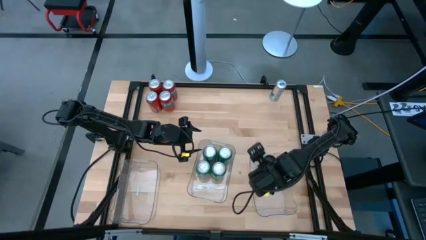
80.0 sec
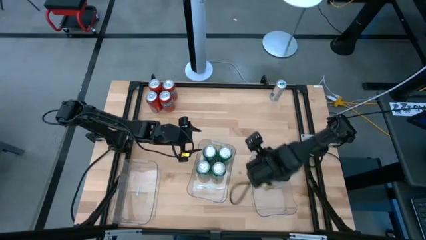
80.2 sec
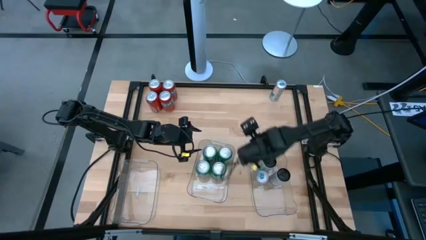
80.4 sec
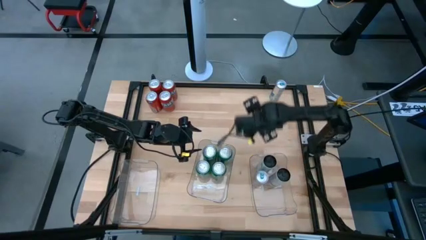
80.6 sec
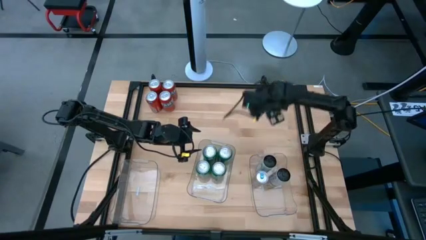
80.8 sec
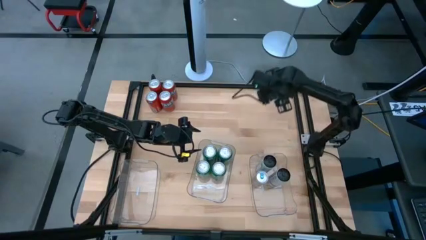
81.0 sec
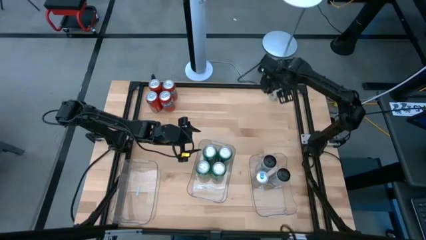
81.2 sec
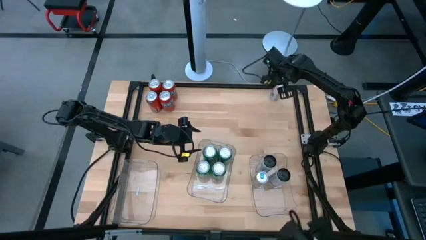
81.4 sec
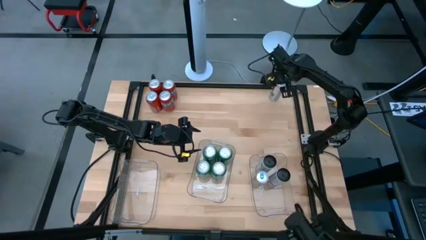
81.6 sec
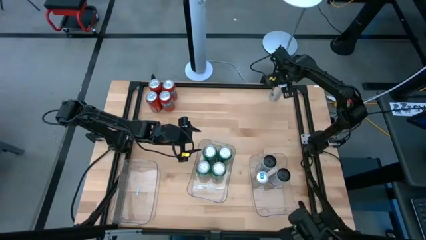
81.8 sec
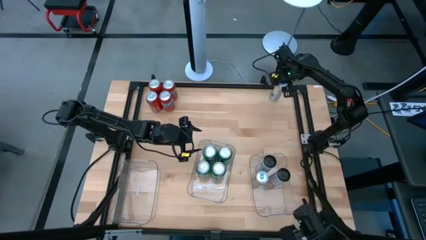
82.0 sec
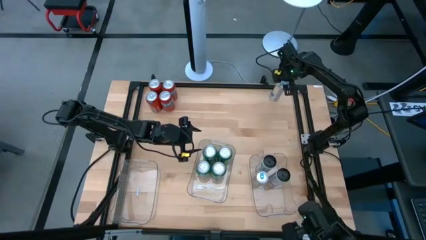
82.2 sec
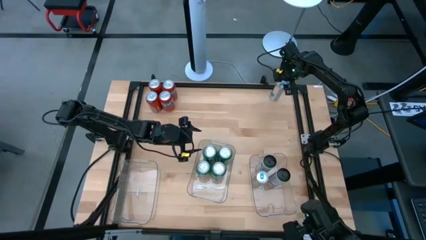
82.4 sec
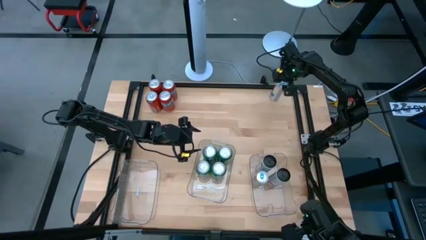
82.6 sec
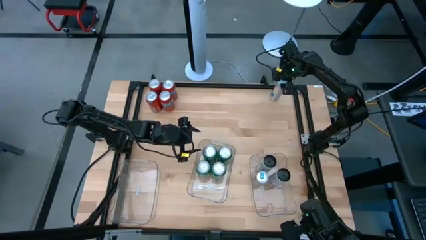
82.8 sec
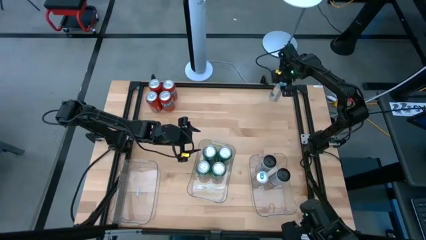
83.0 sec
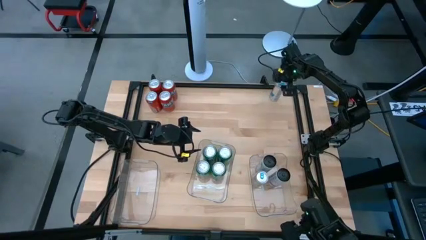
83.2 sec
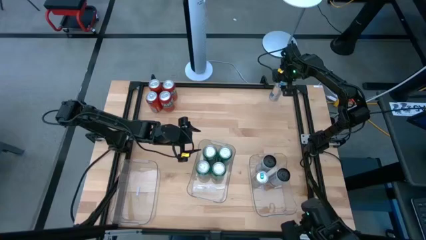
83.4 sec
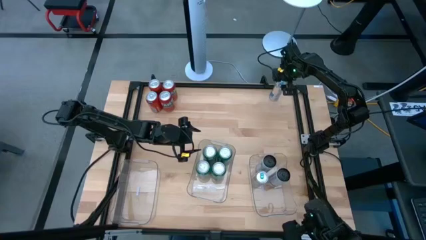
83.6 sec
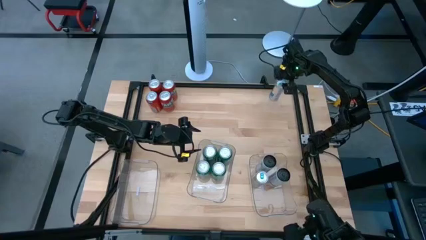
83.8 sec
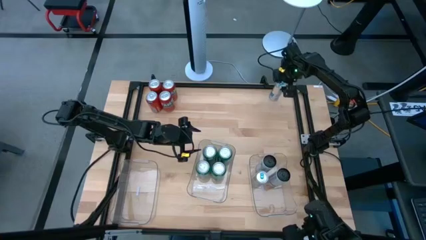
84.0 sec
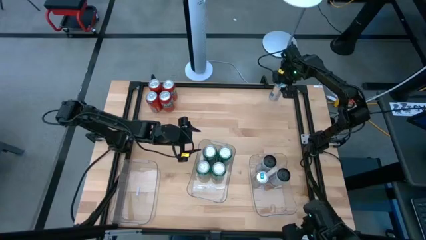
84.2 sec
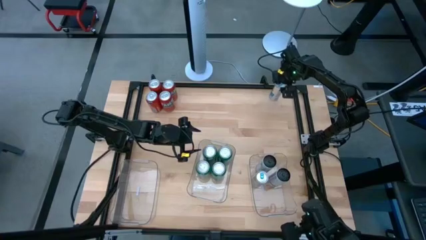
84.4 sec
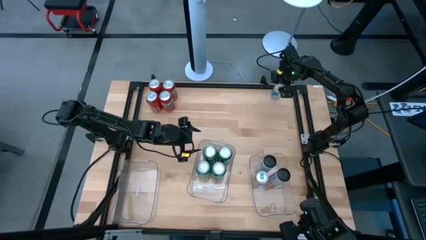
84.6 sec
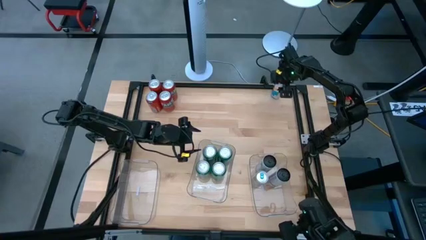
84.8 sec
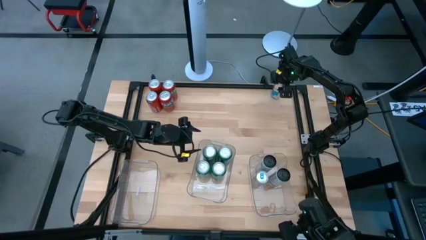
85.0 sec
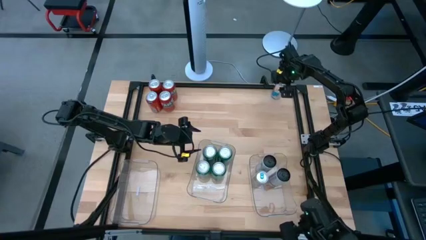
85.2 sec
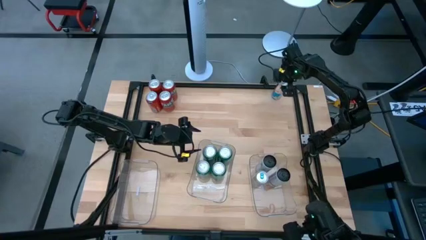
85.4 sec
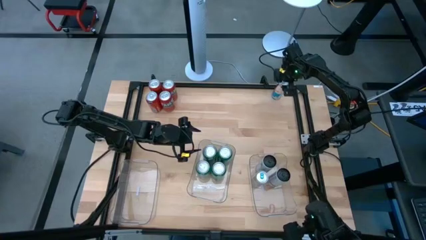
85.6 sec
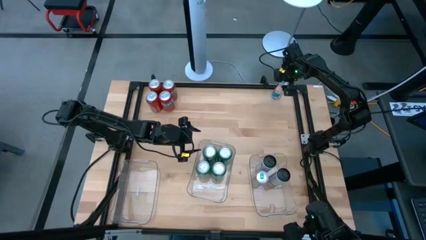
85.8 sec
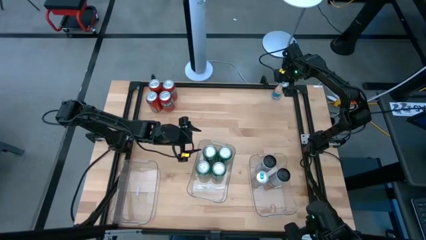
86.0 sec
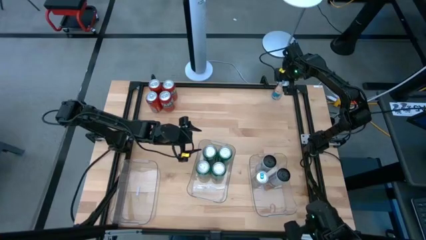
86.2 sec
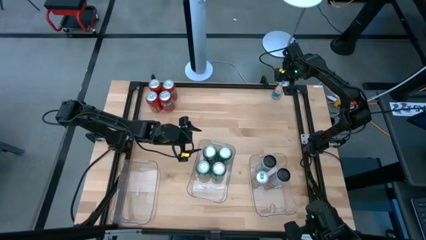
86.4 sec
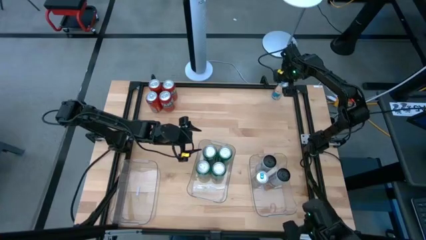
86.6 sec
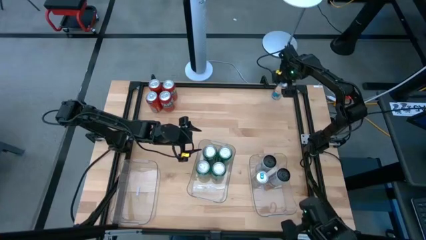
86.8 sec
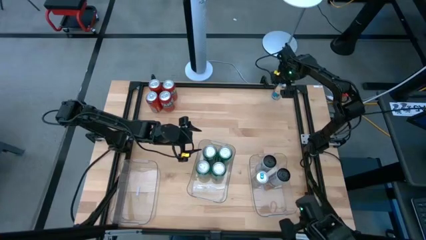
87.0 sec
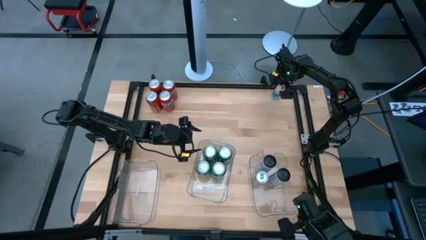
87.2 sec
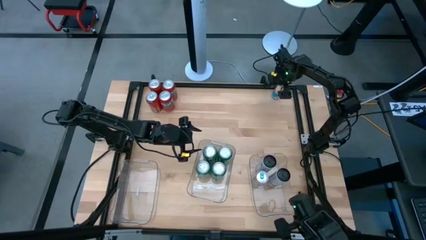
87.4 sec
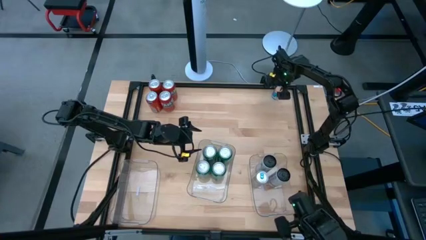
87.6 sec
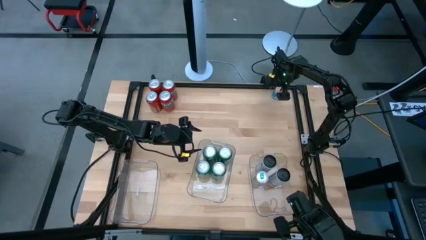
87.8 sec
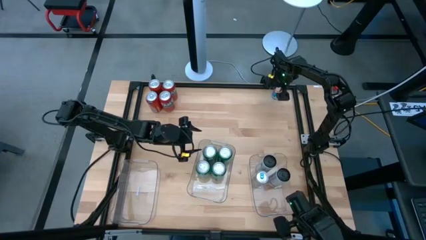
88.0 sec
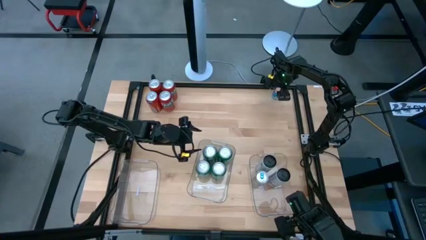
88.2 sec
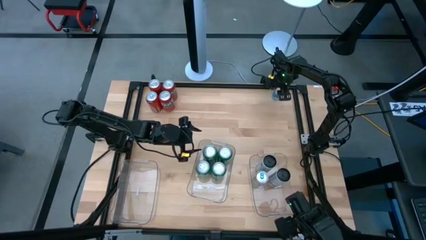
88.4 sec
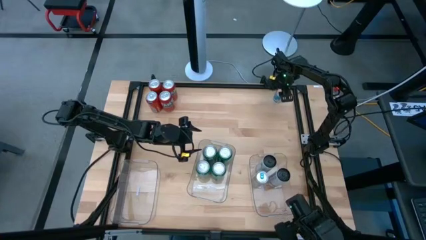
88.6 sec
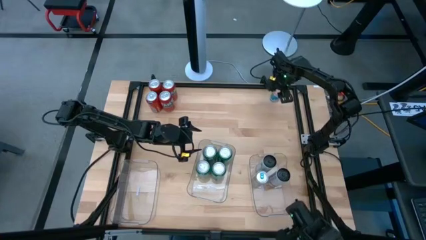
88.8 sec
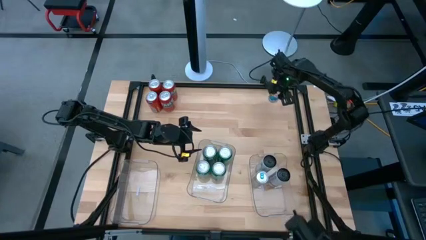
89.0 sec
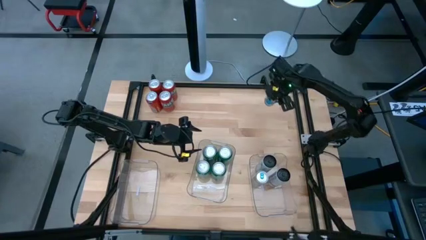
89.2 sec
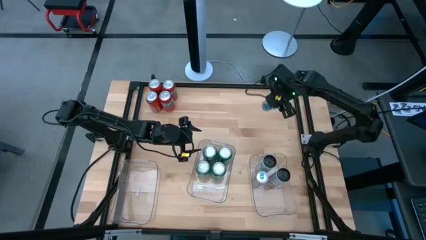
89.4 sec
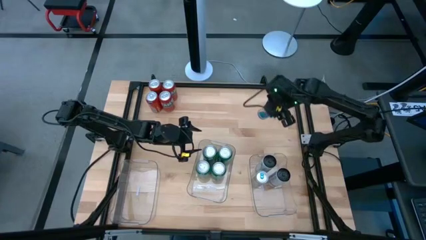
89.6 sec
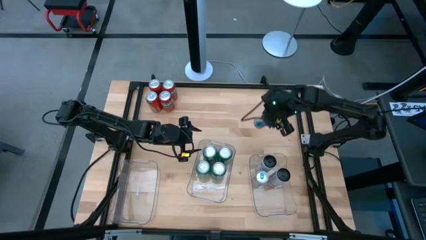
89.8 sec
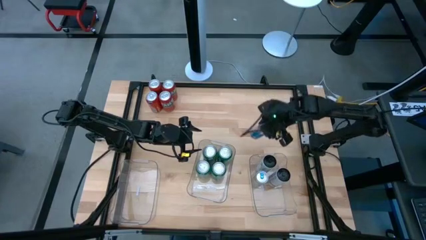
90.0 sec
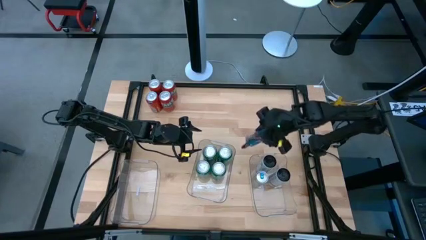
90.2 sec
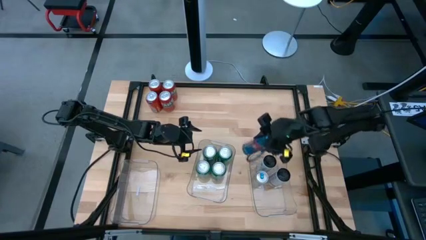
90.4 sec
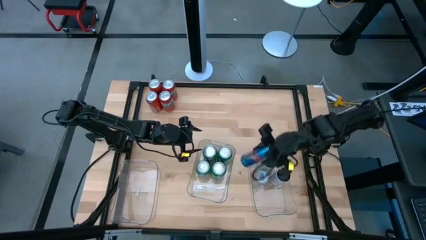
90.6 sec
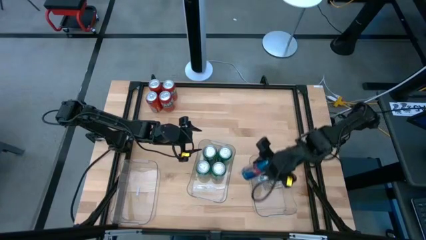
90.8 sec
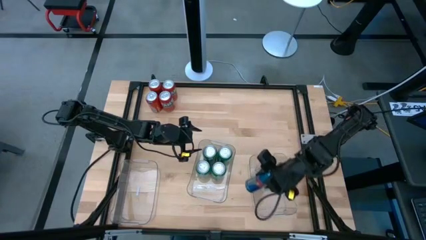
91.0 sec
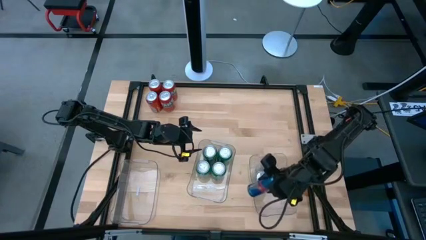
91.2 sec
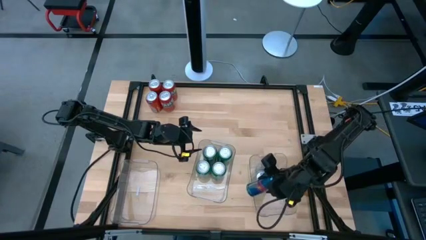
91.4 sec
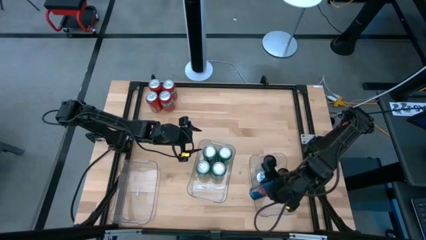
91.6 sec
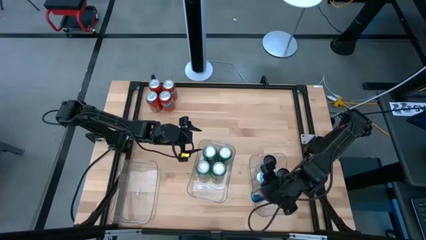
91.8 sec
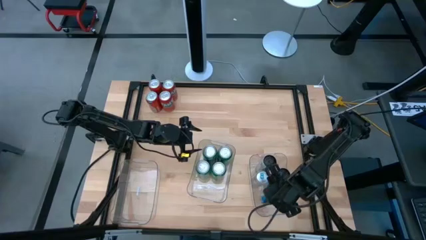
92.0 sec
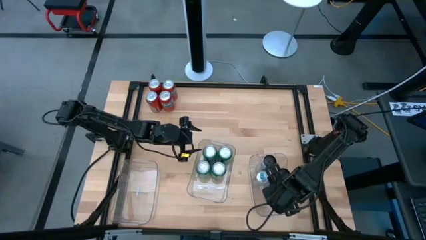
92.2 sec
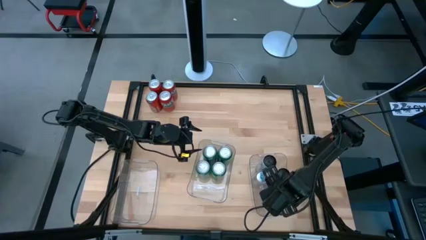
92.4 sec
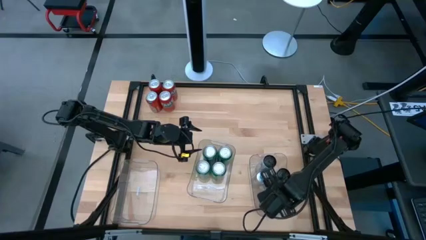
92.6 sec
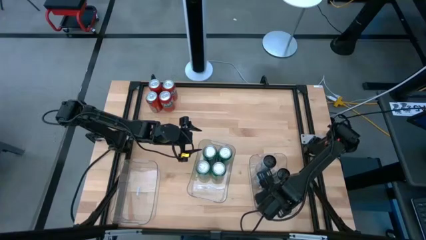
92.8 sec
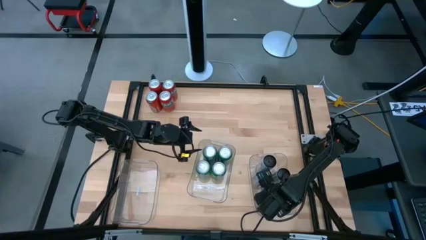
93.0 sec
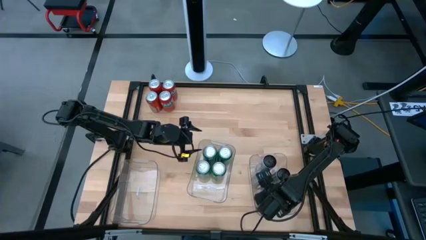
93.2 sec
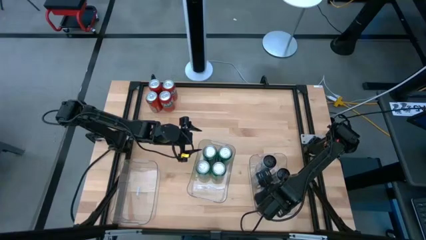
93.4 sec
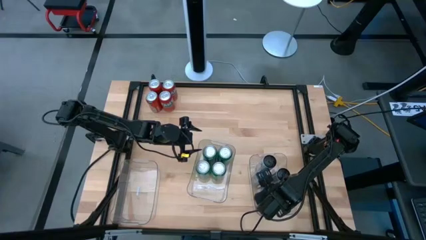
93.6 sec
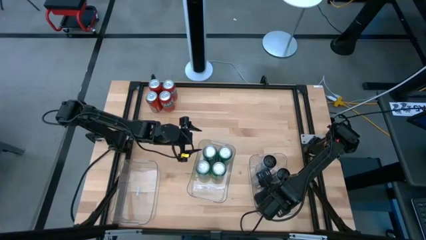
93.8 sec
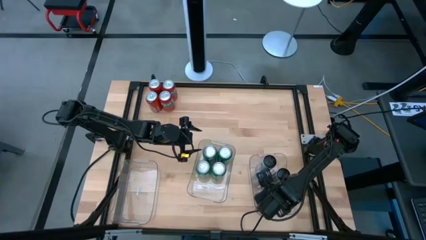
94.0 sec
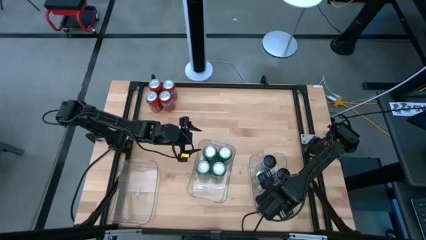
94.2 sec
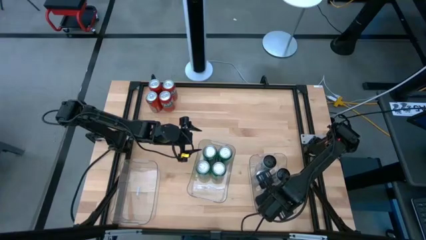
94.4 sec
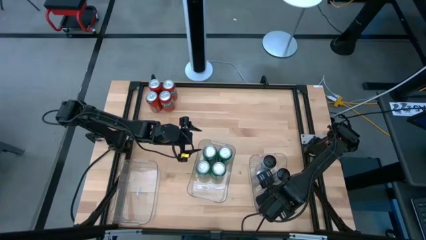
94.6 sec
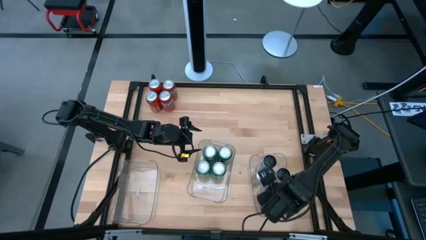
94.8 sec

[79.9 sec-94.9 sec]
Task: Sort soda cans
Put the blue soda can into the right transparent bin
